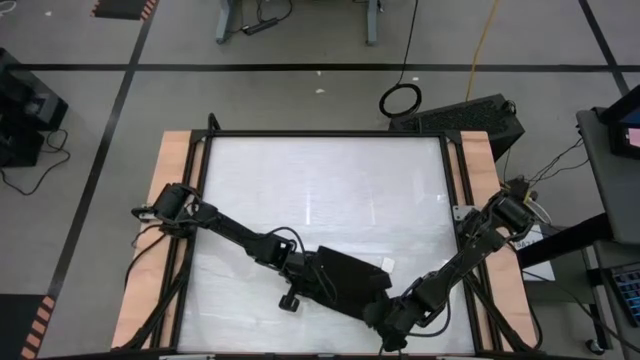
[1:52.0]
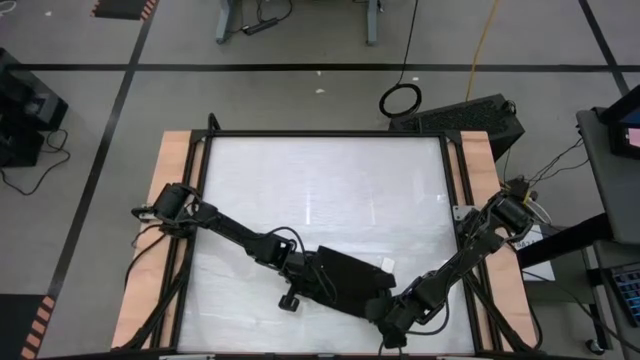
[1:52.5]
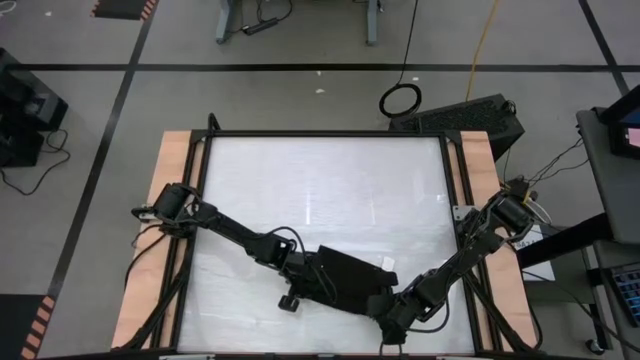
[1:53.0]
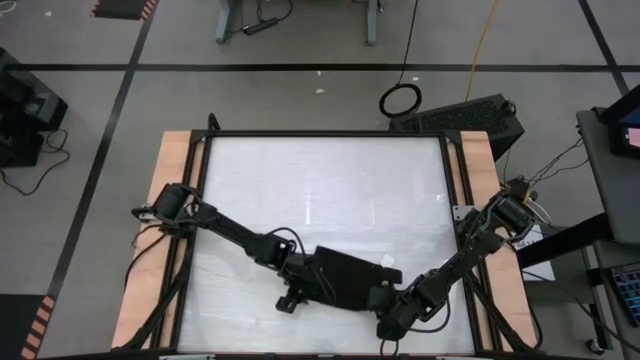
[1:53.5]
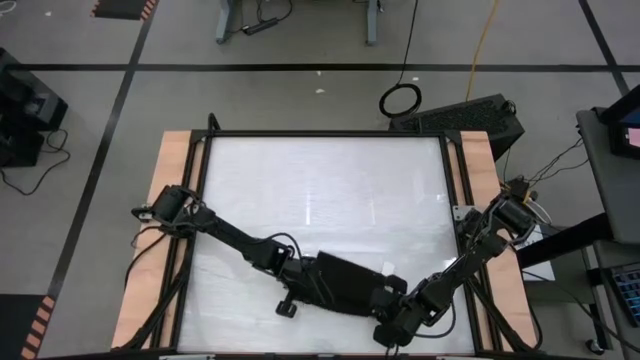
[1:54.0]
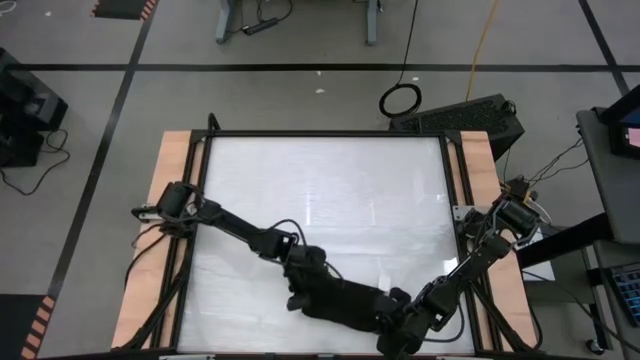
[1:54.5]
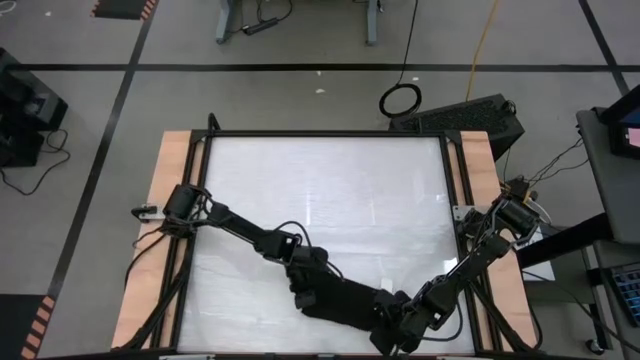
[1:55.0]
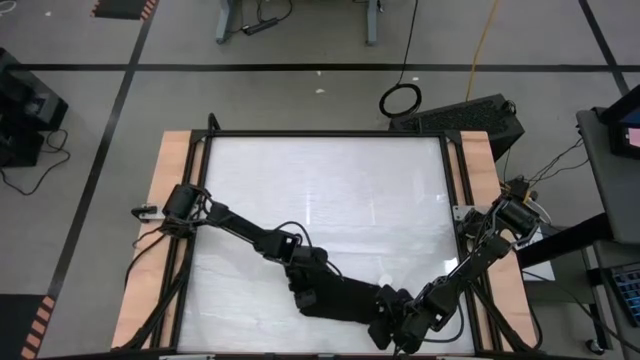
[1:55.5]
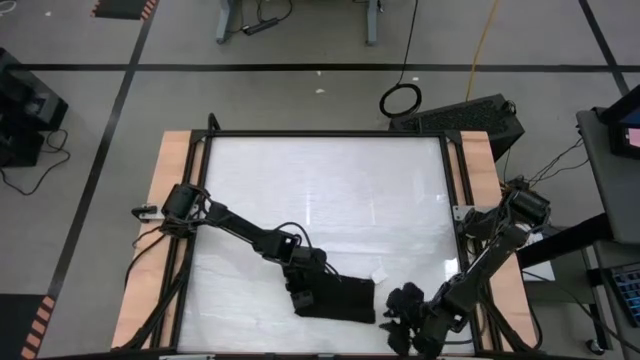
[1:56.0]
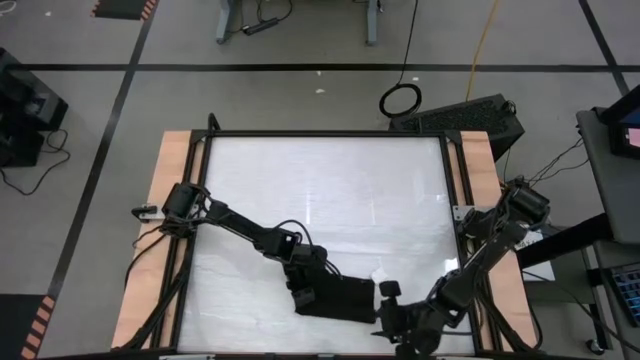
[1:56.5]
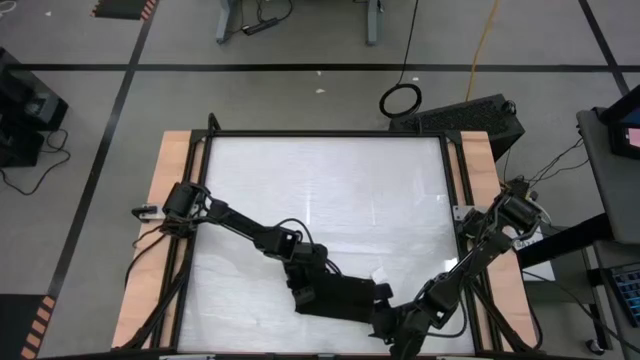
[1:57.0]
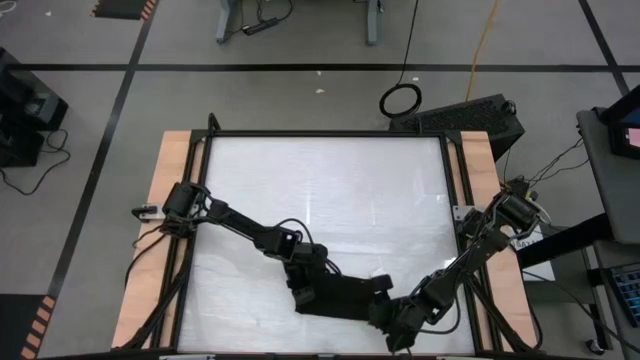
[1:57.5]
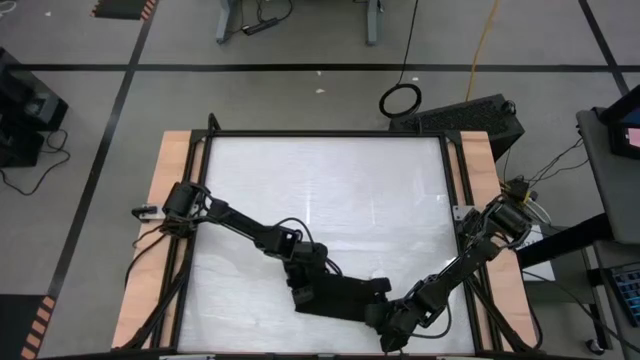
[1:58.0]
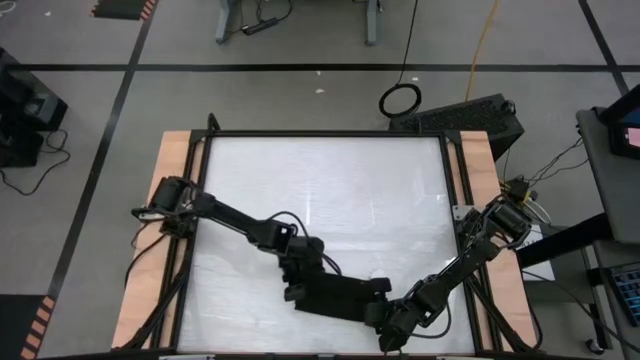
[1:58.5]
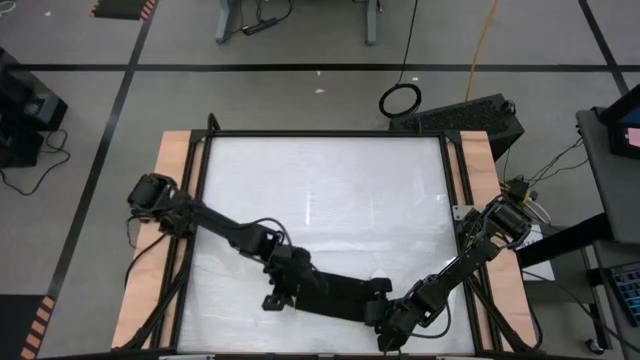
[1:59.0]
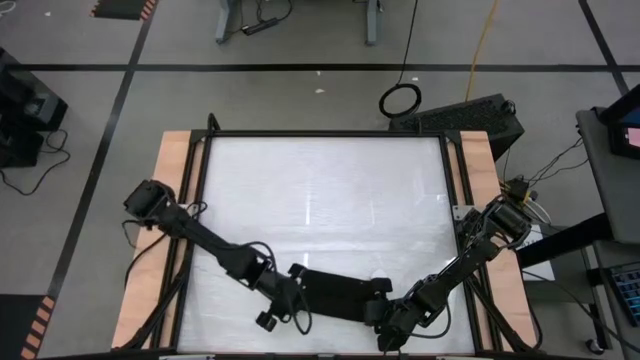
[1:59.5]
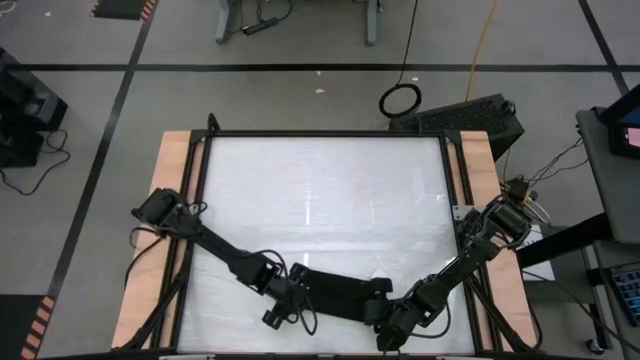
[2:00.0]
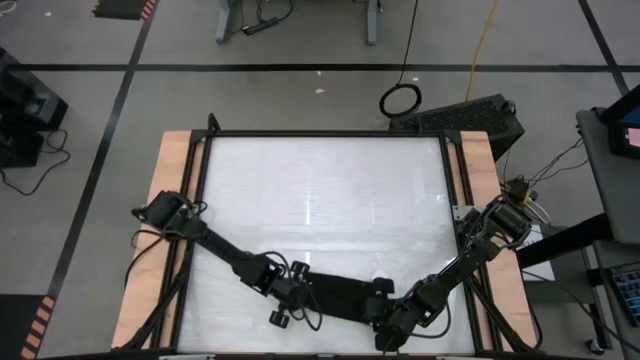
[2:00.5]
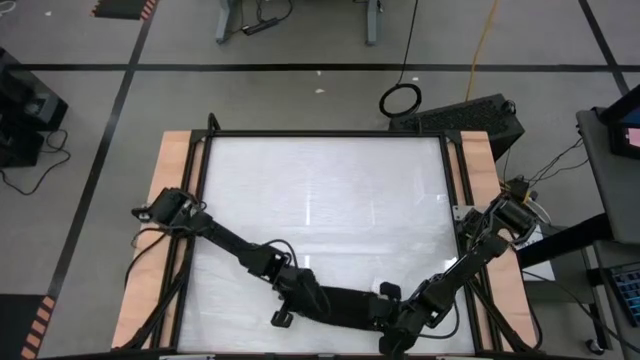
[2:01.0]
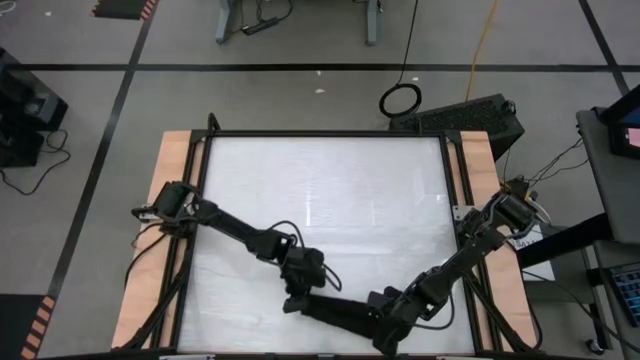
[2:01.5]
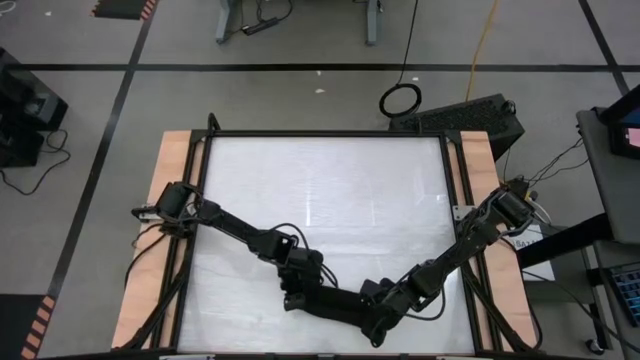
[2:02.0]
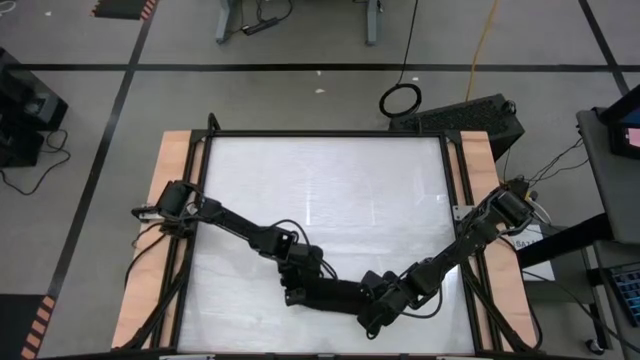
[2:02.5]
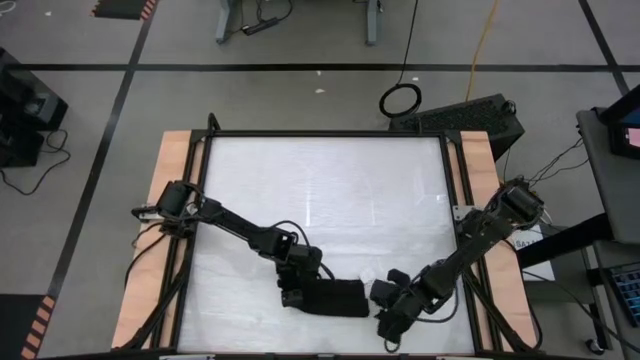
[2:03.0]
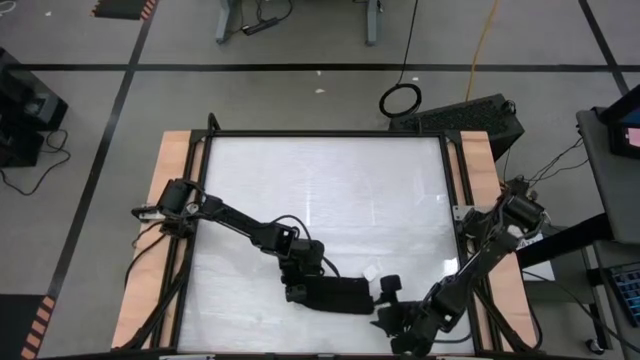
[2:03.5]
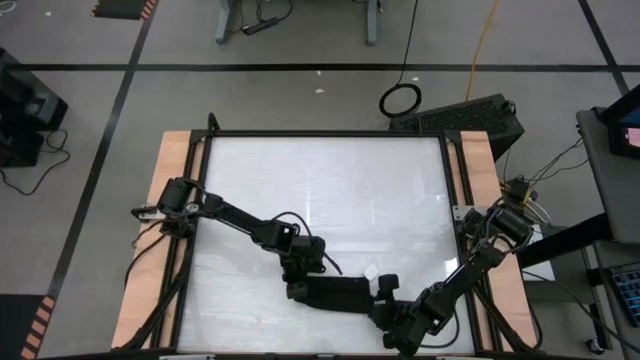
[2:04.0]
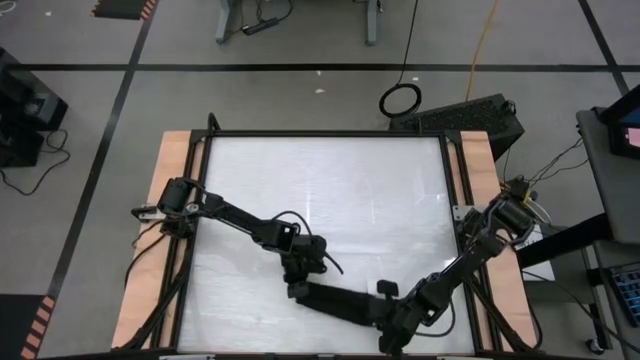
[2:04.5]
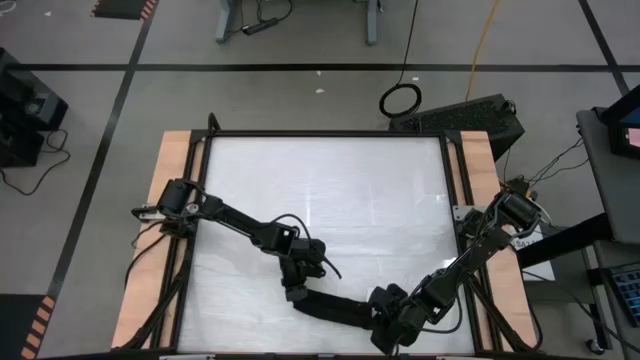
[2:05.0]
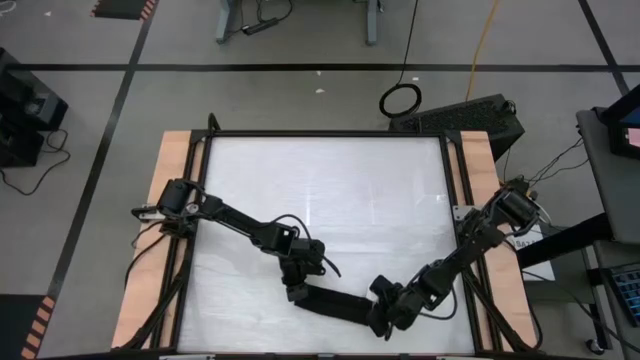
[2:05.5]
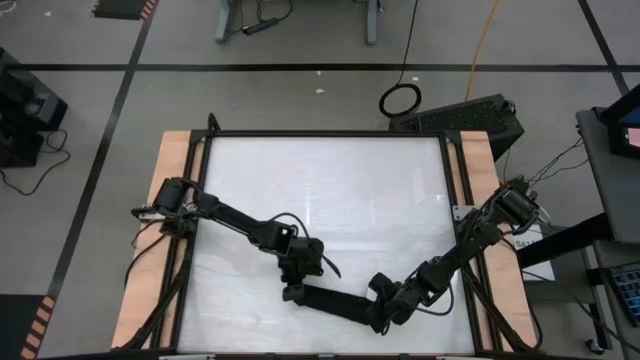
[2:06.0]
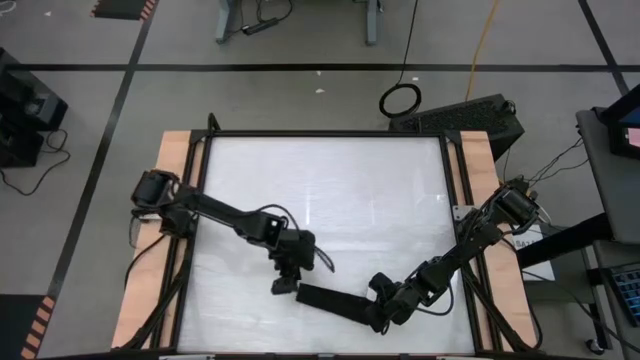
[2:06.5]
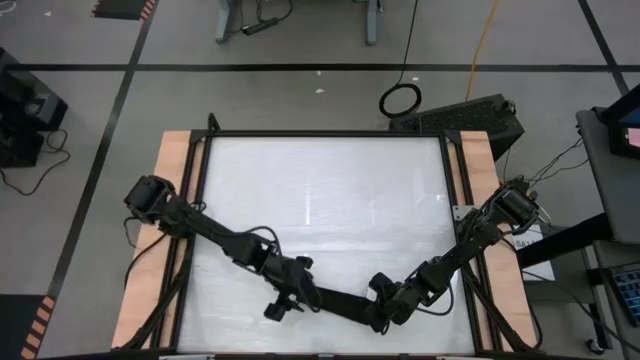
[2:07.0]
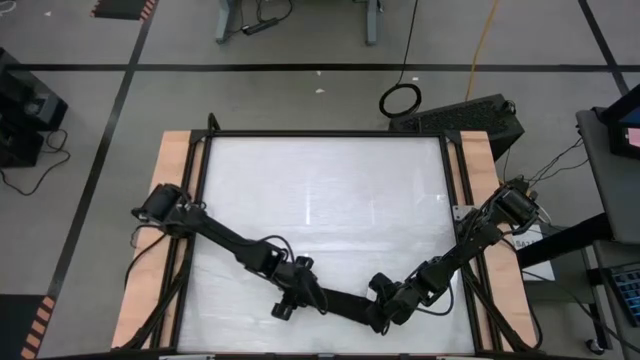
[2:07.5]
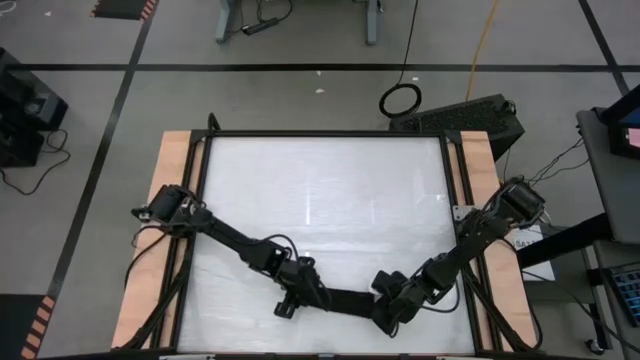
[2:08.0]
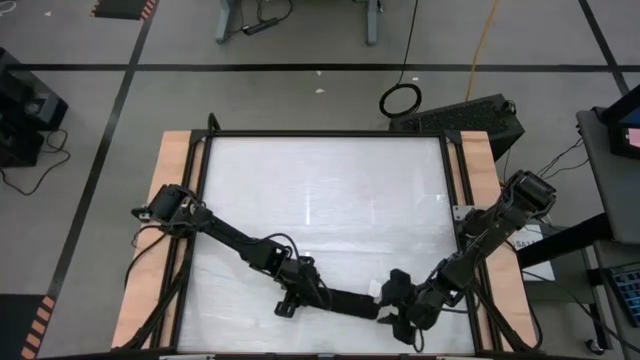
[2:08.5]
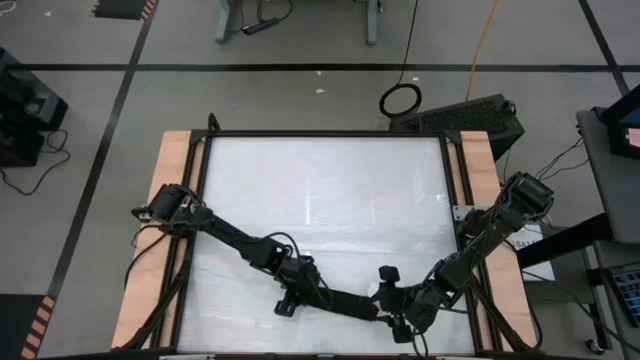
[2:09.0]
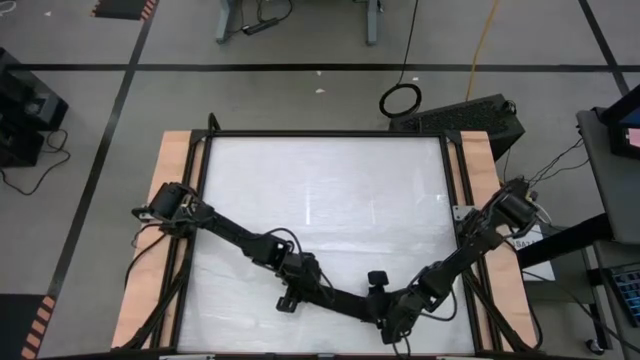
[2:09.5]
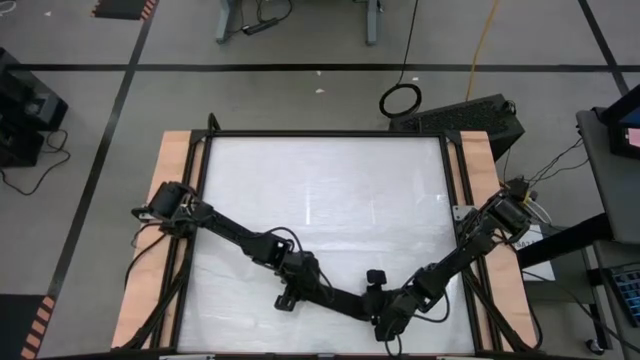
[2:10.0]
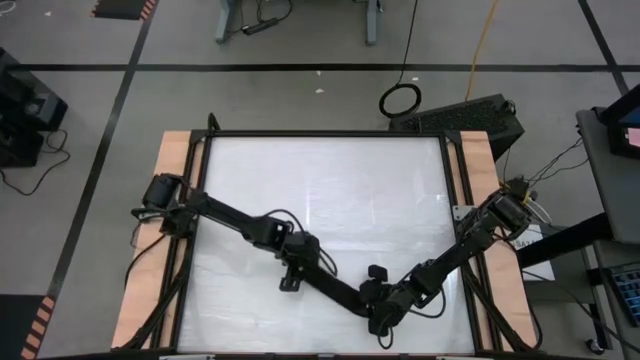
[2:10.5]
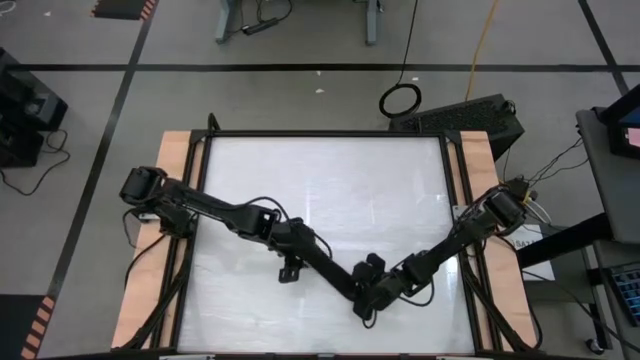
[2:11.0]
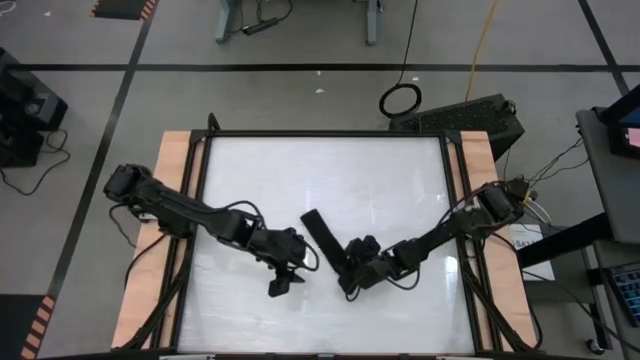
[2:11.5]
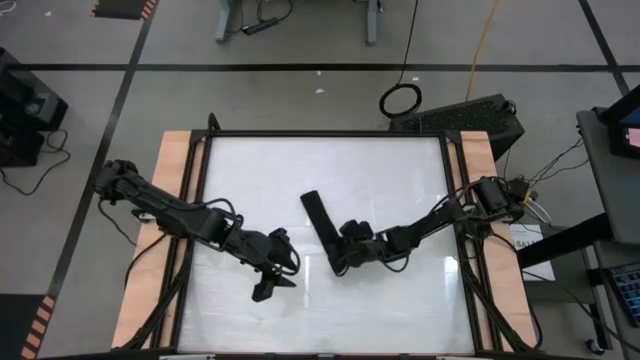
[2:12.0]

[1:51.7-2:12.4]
Task: Roll towel
Roll the black towel
